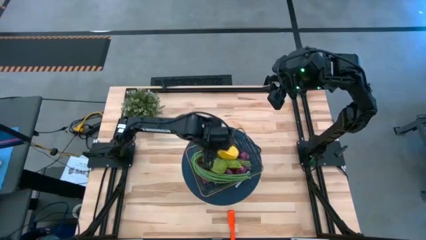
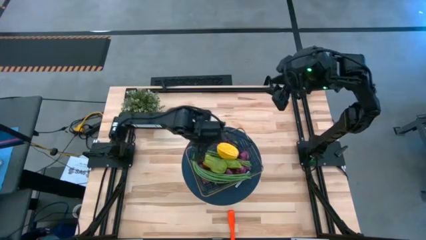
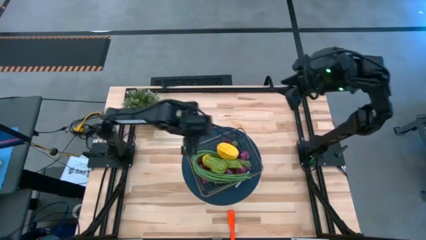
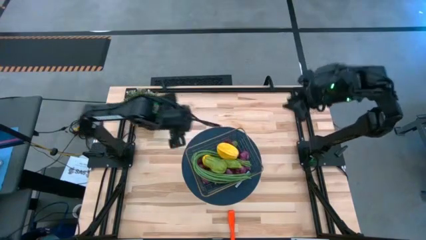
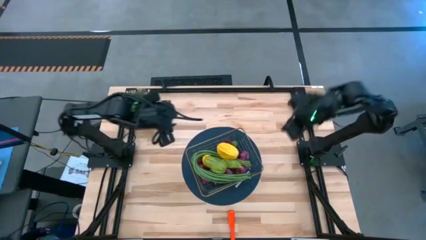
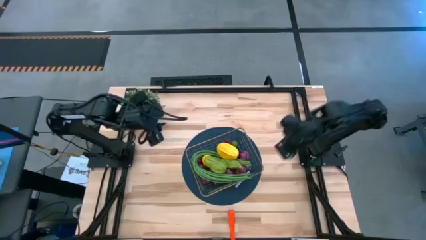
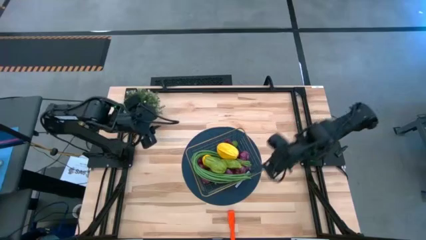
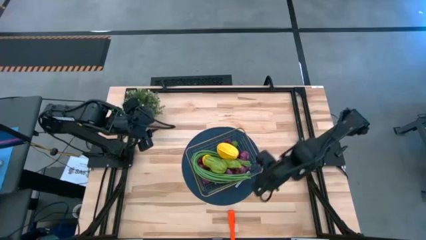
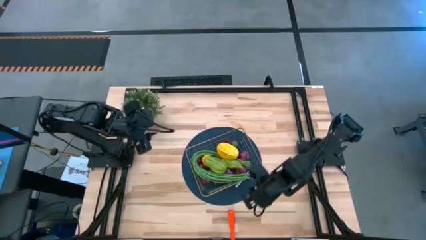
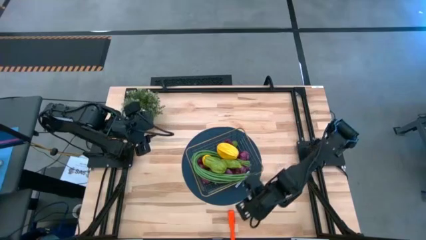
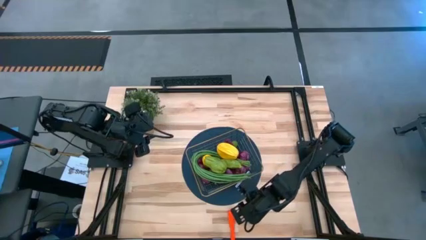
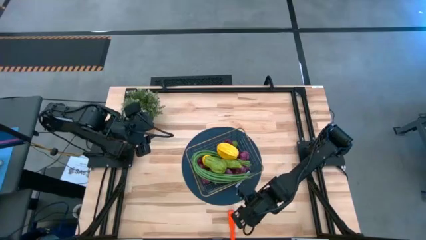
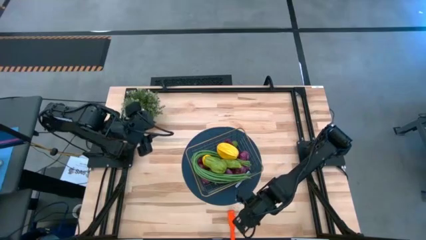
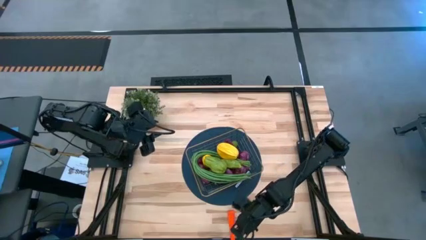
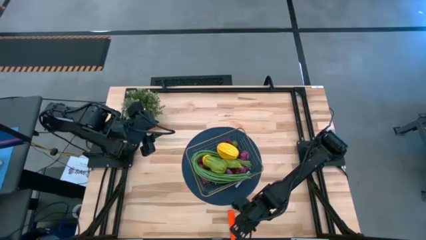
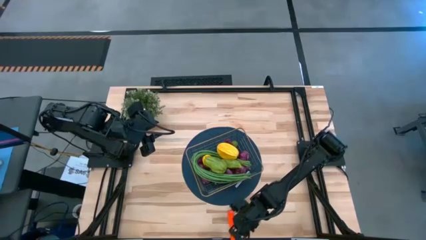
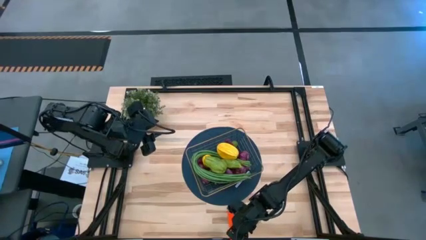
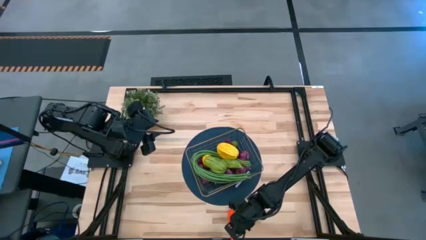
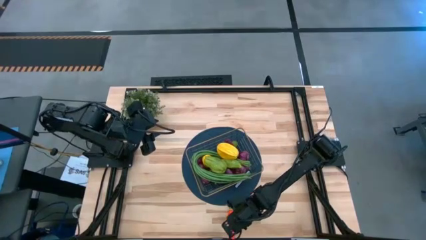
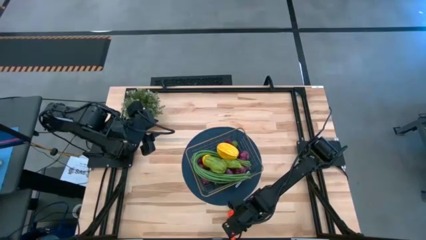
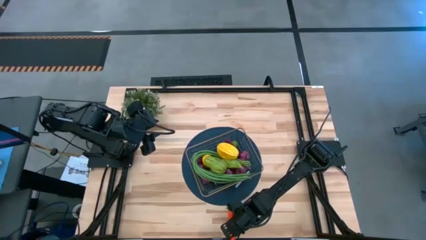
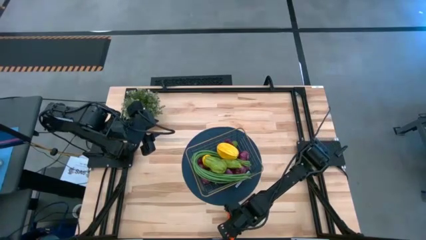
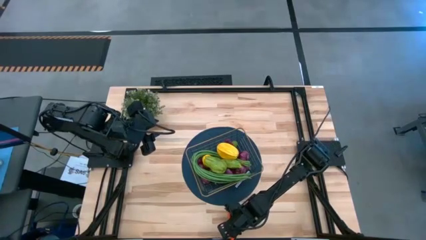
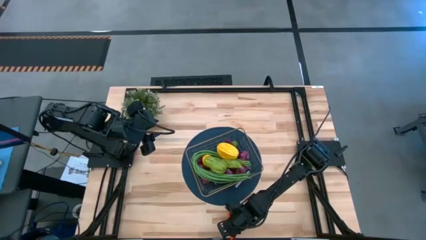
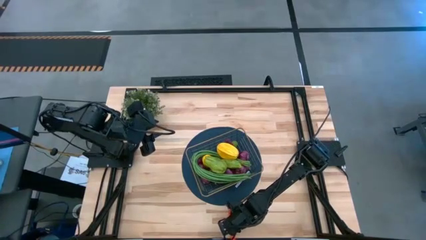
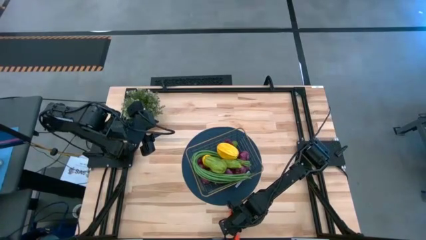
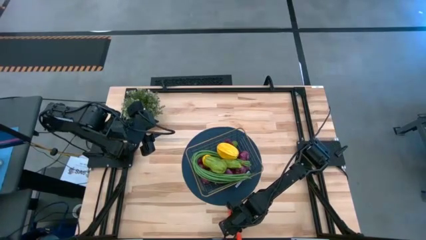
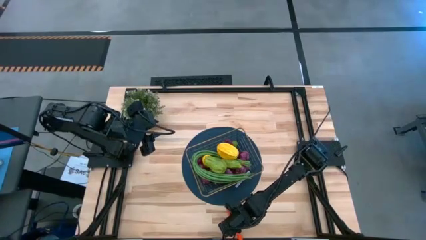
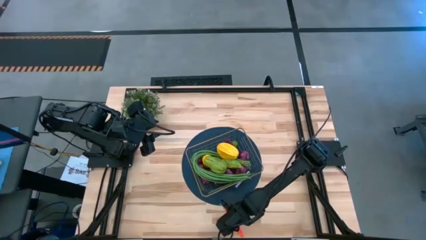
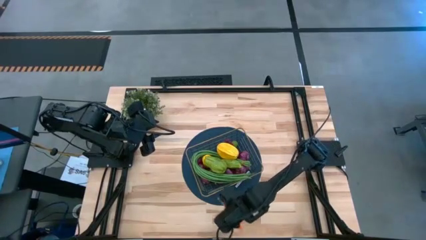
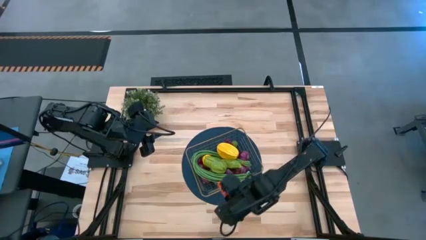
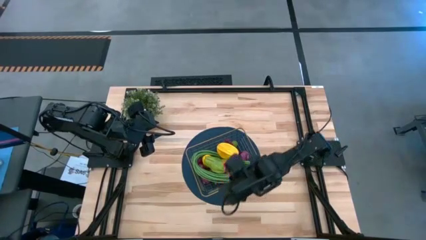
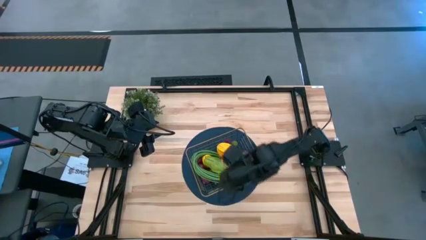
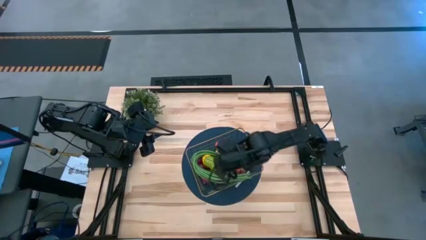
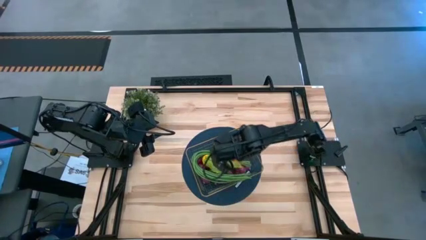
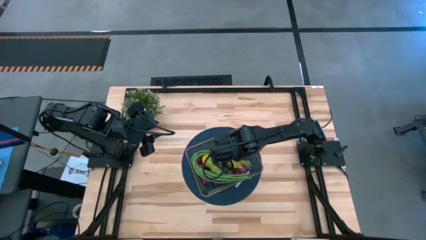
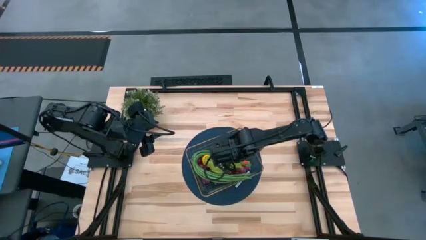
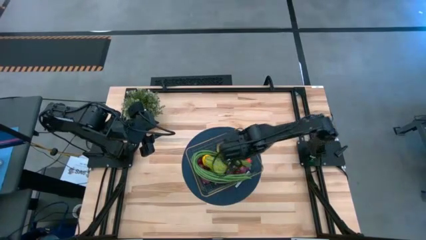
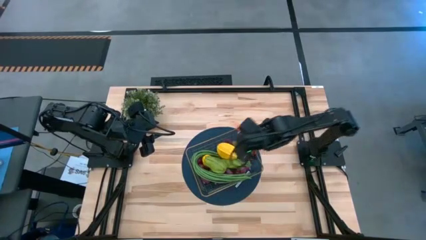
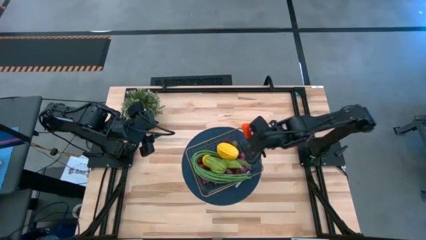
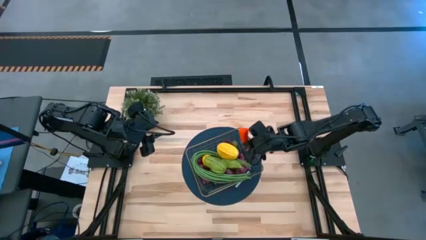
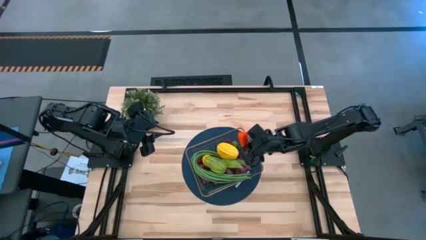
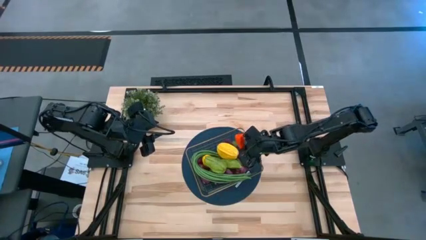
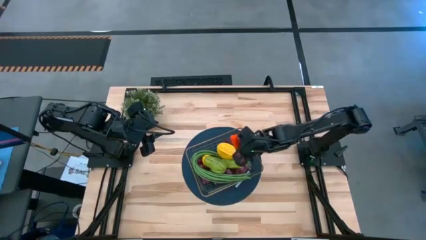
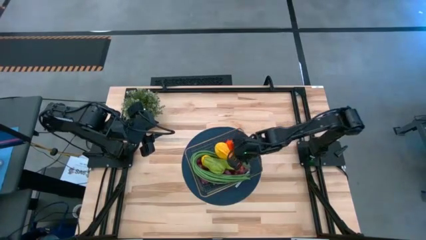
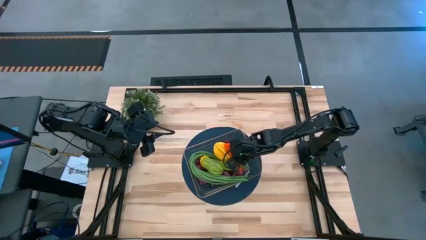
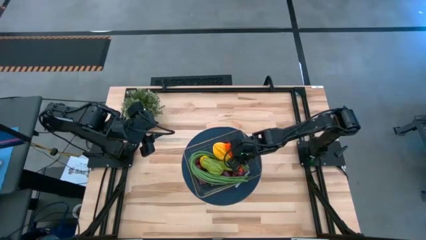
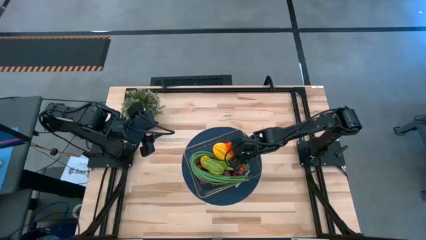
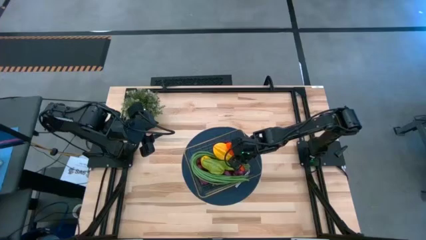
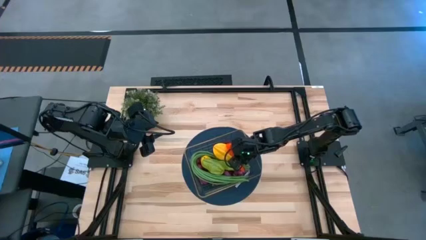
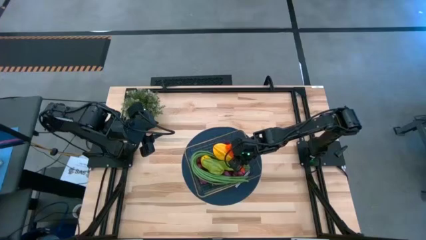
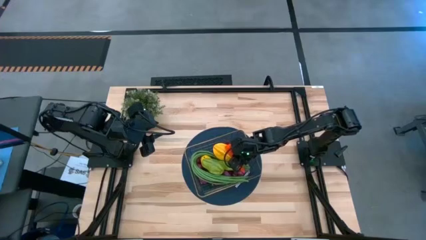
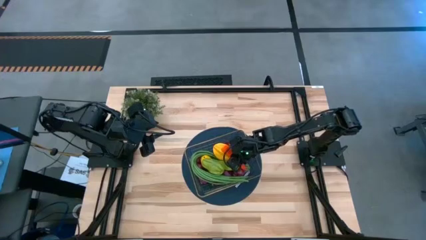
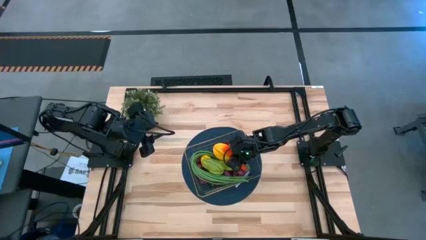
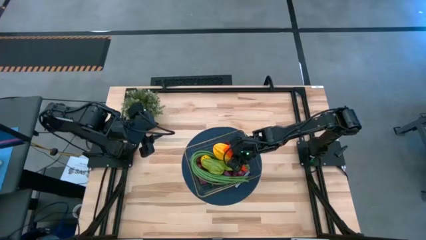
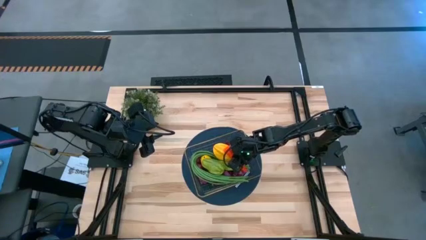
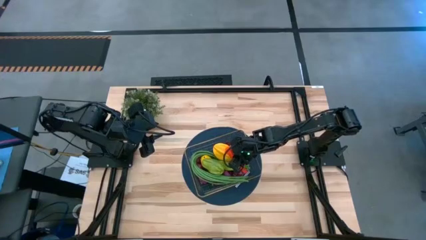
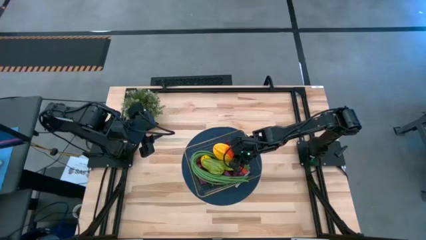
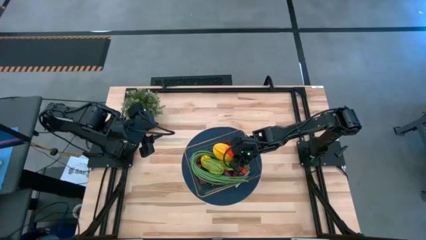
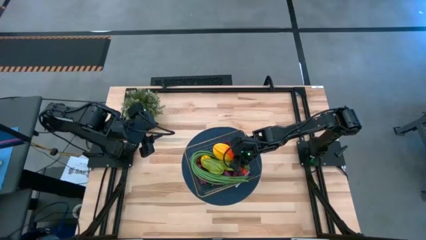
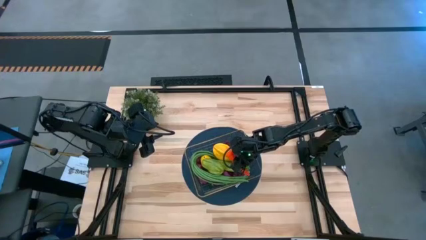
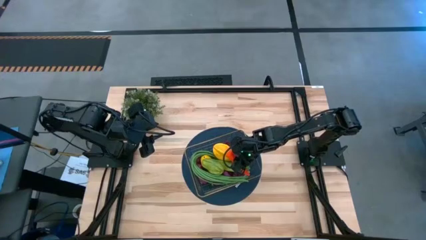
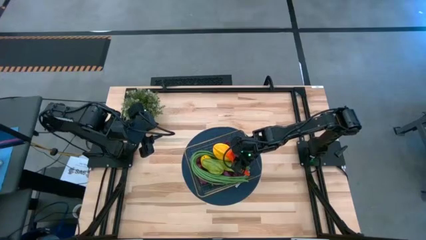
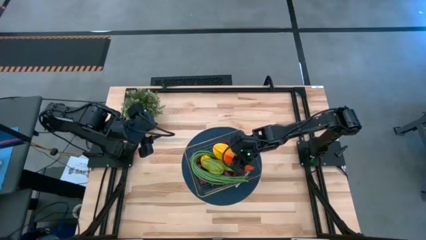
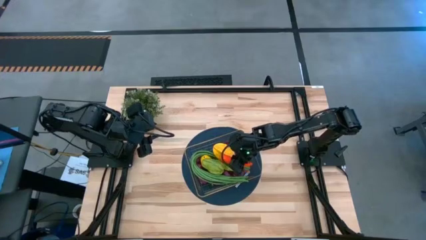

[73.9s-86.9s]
Task: Build produce basket
Put the orange carrot into the gold wire basket
